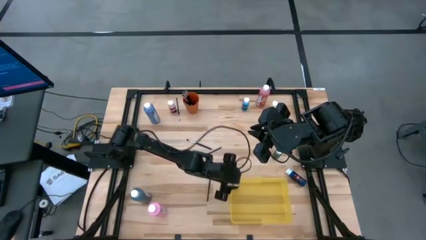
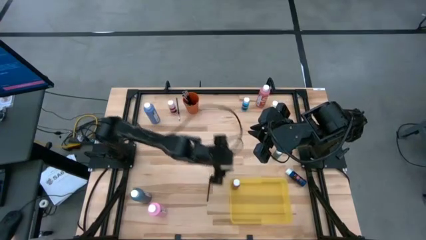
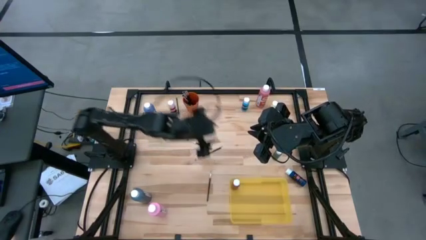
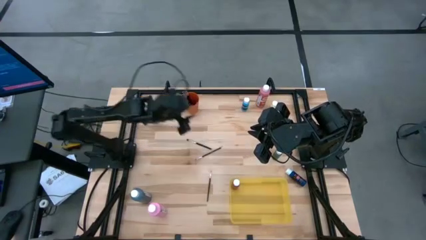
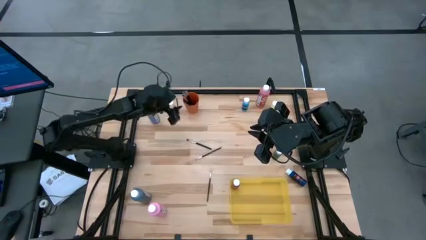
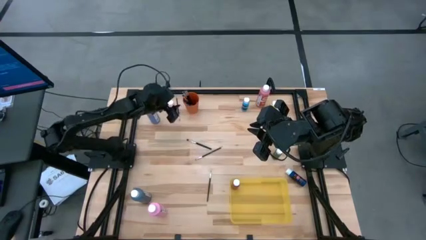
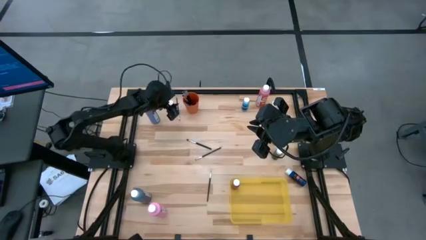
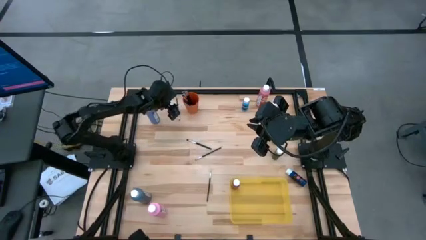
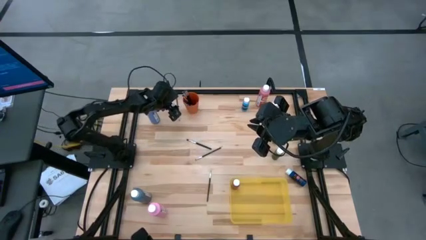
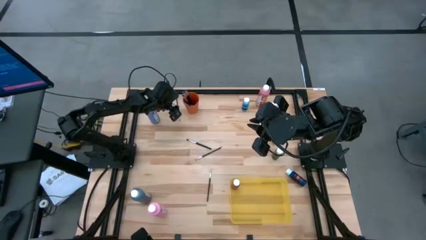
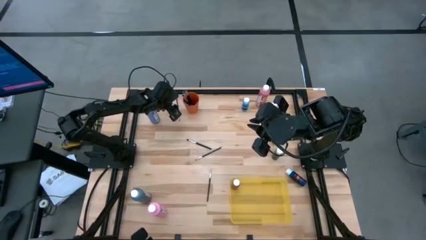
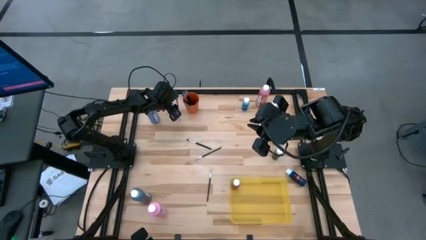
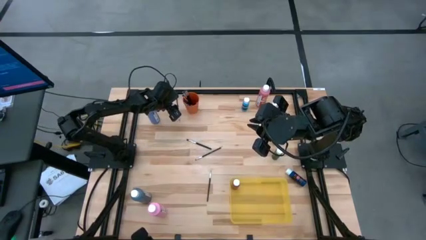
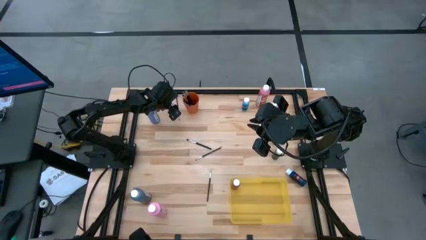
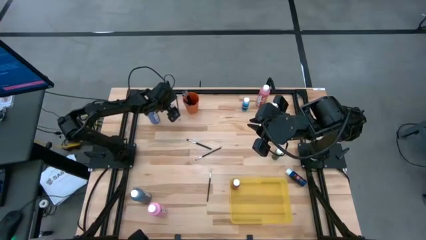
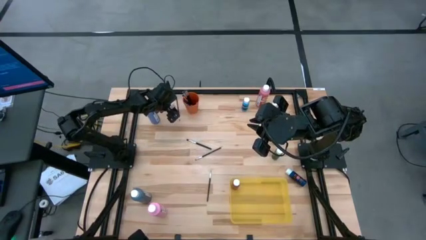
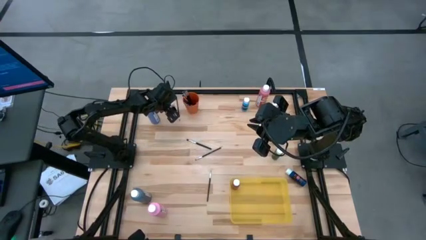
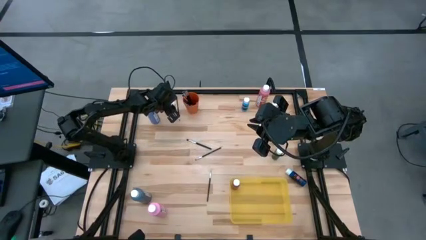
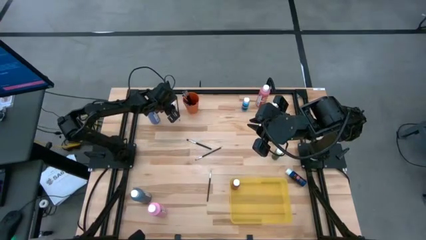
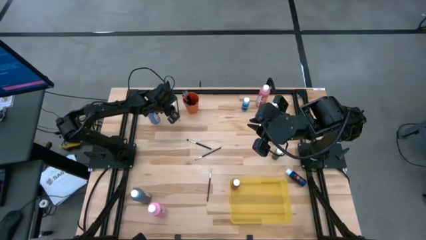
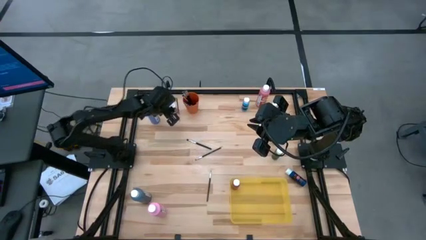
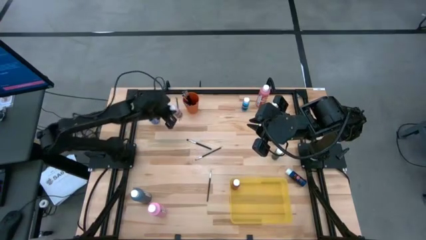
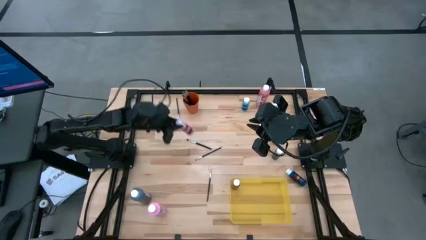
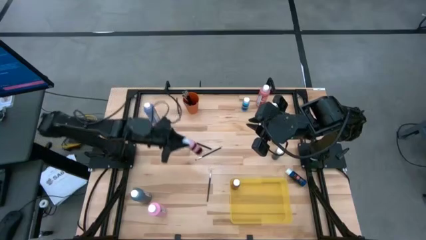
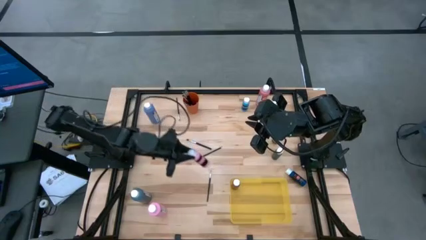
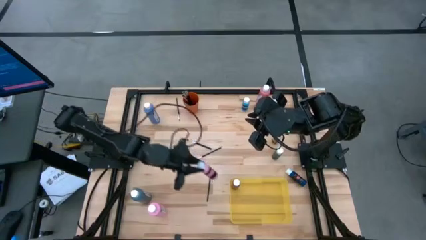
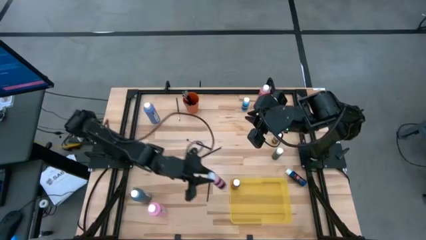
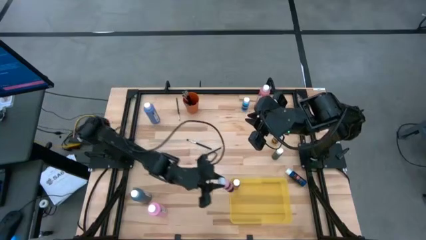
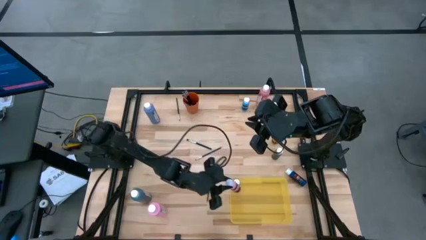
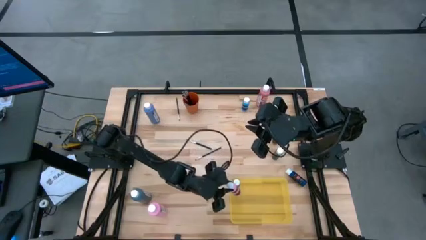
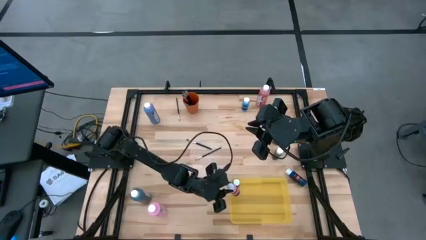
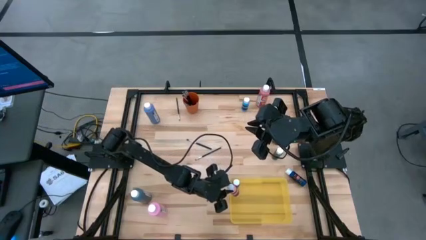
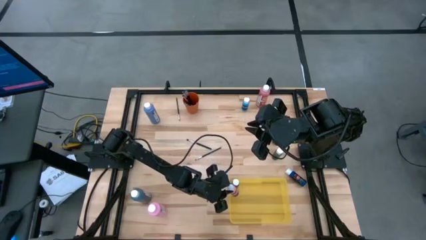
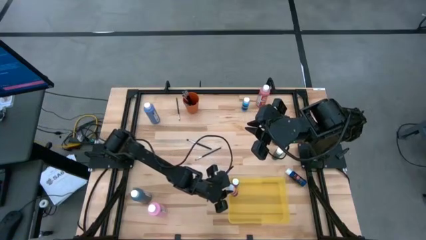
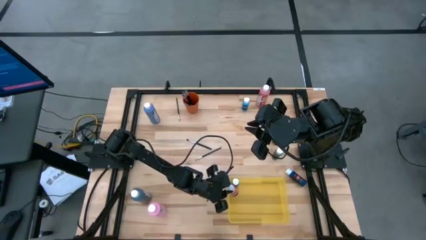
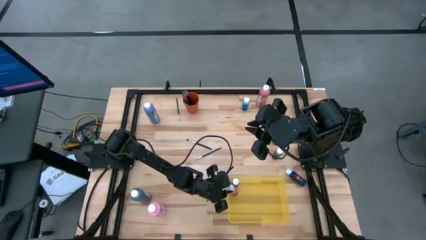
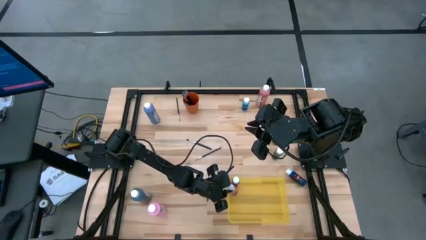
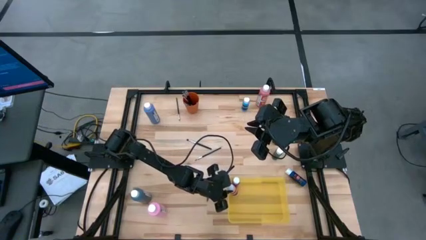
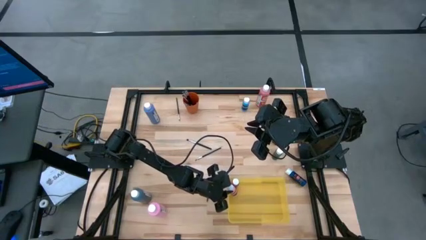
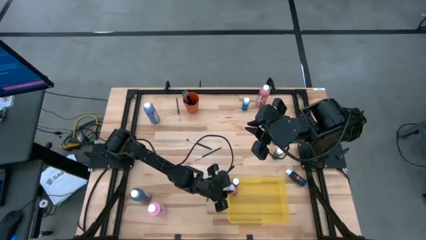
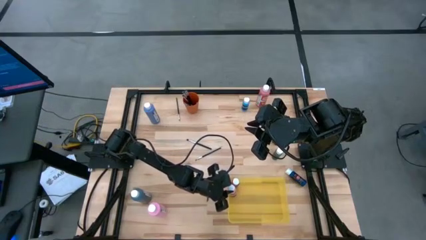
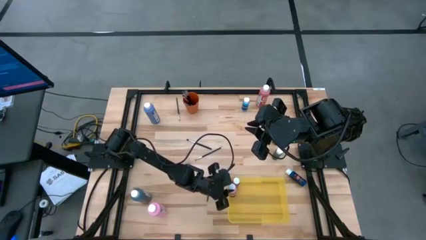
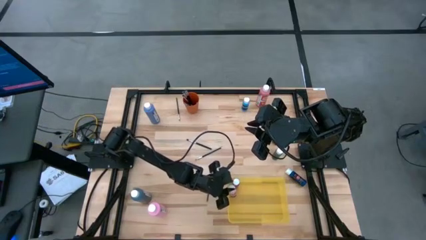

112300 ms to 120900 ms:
Task: Pick & Place Paint Supplies
Put the pink paint bottle into the yellow bin

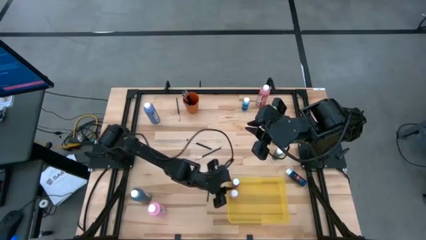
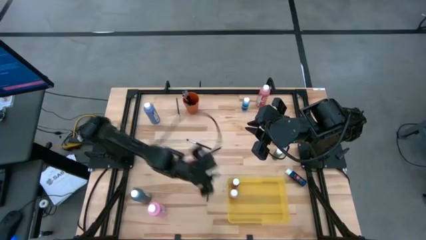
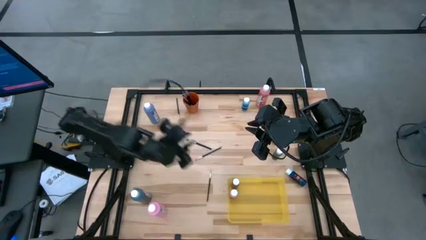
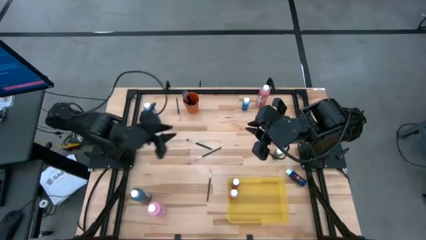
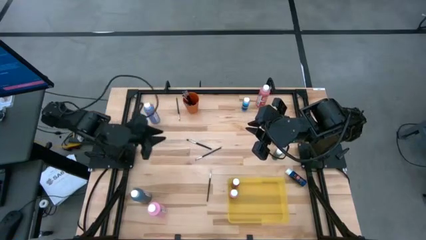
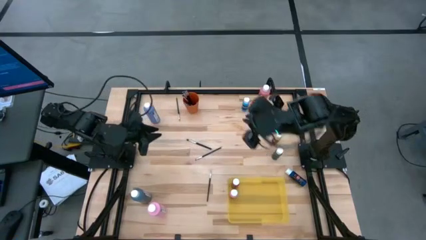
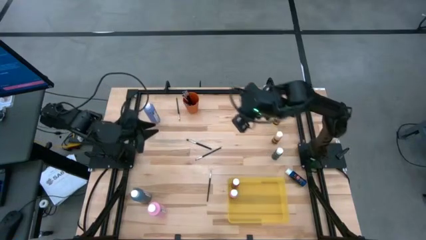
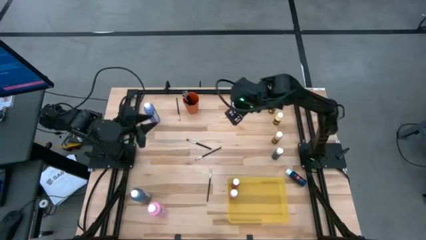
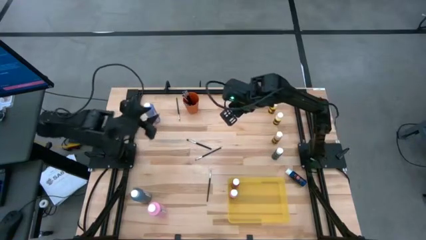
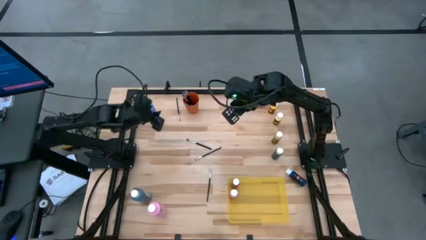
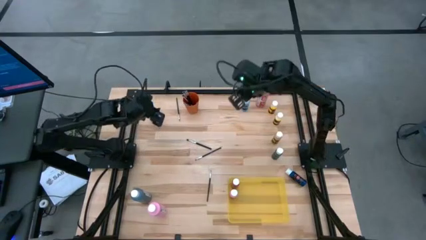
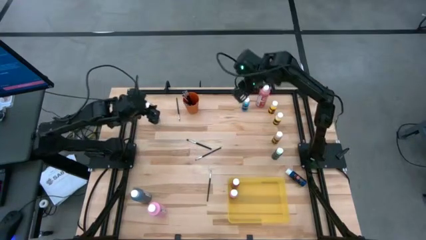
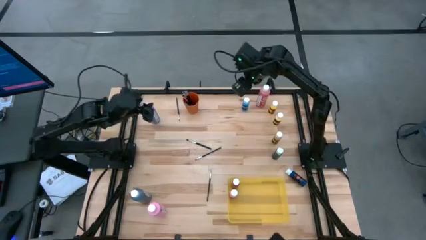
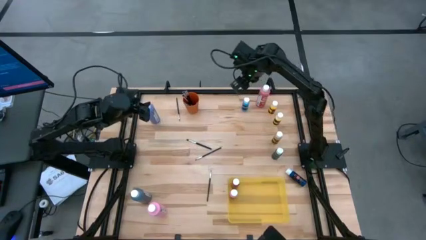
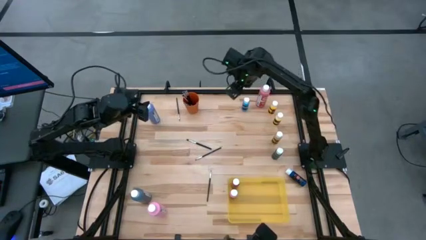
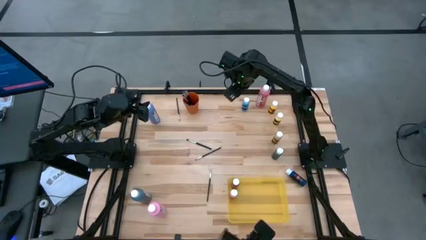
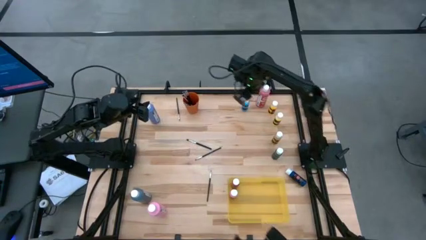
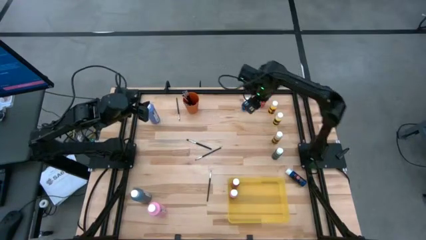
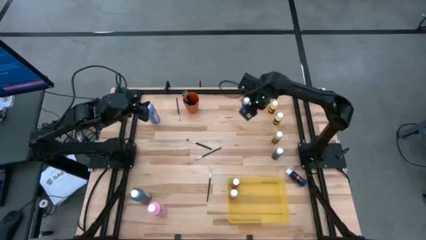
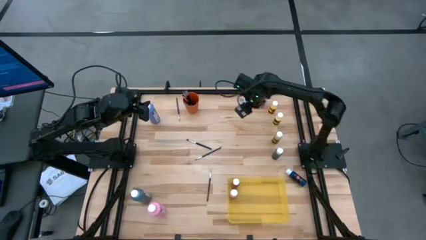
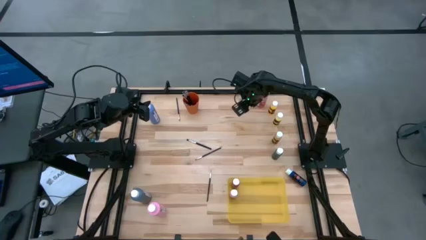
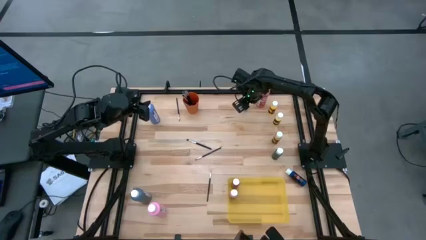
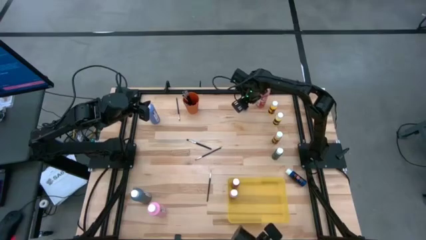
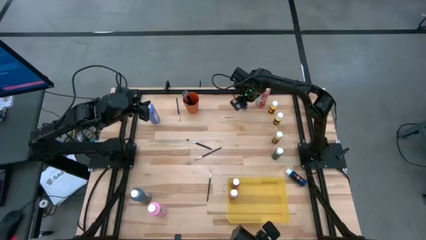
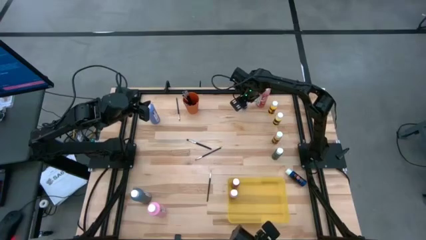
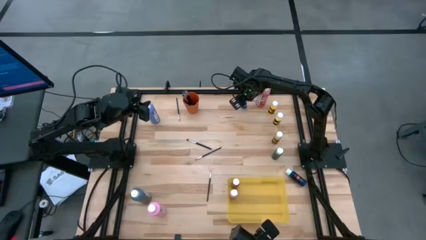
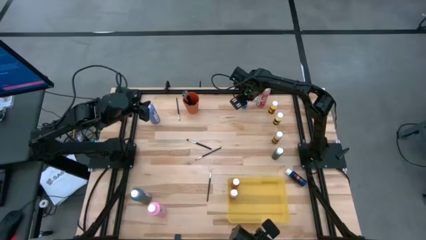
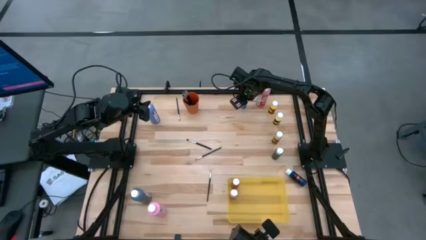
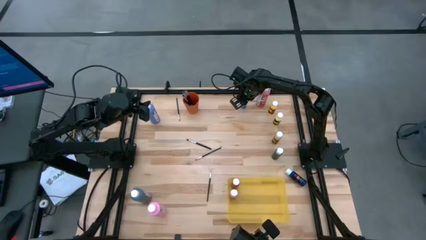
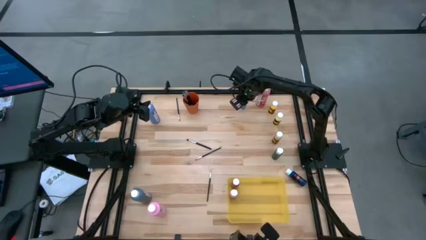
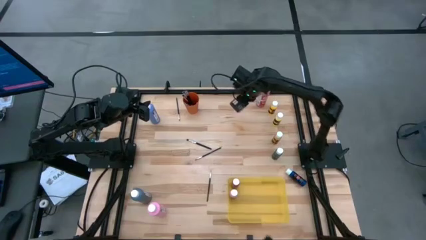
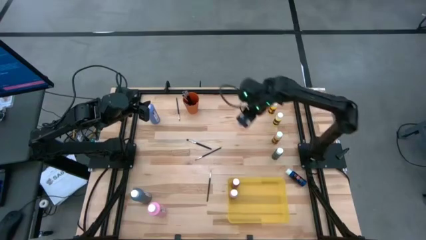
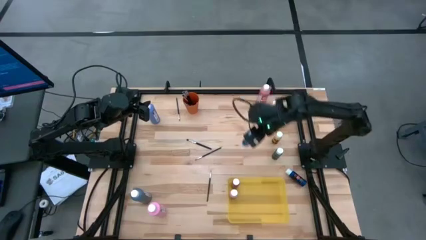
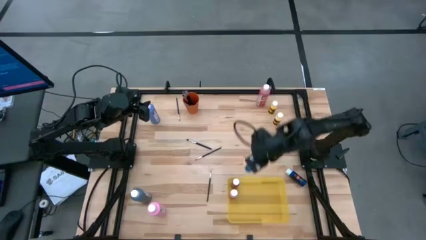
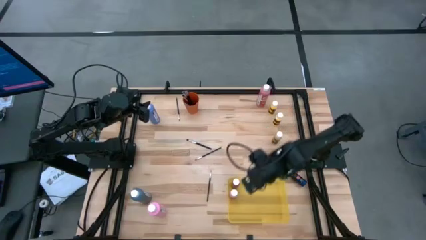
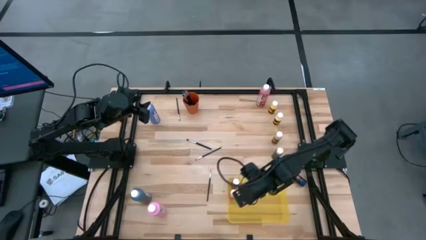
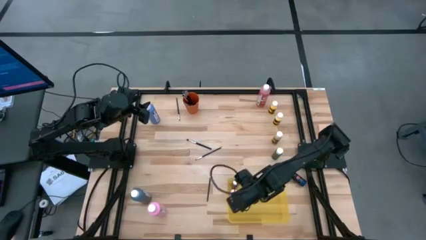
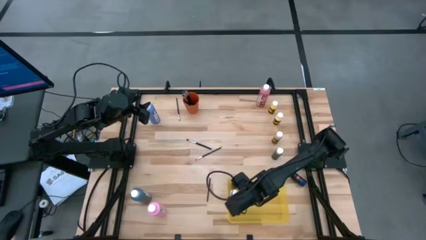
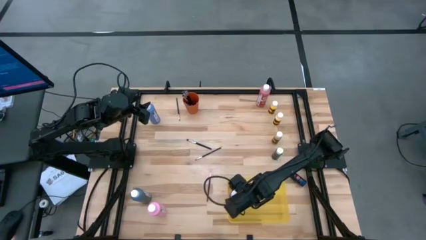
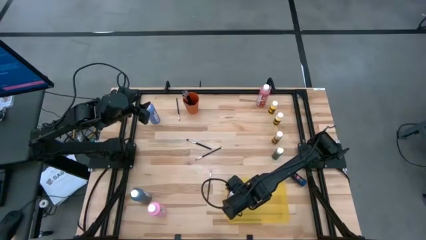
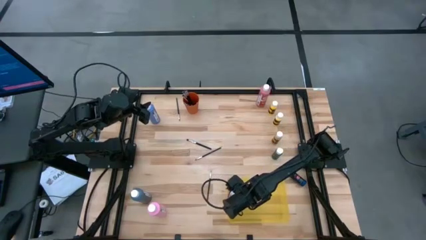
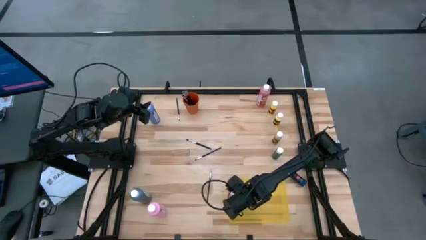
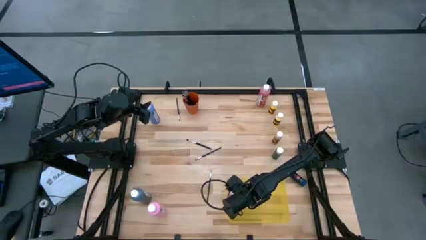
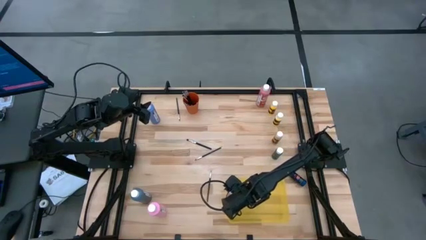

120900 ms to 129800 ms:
Put the light blue paint bottle into the yellow bin
